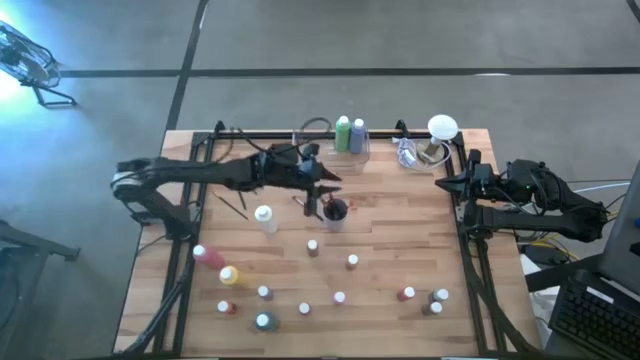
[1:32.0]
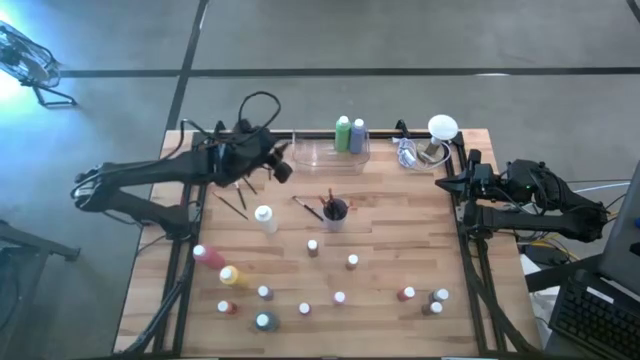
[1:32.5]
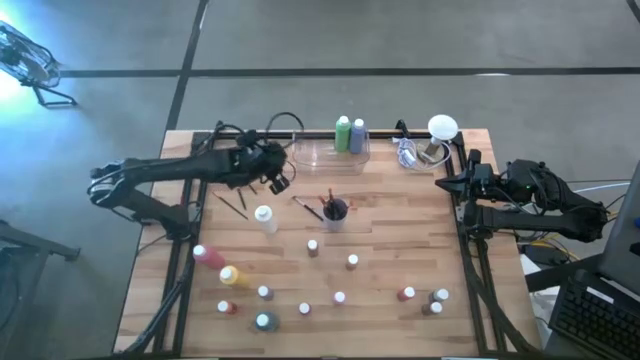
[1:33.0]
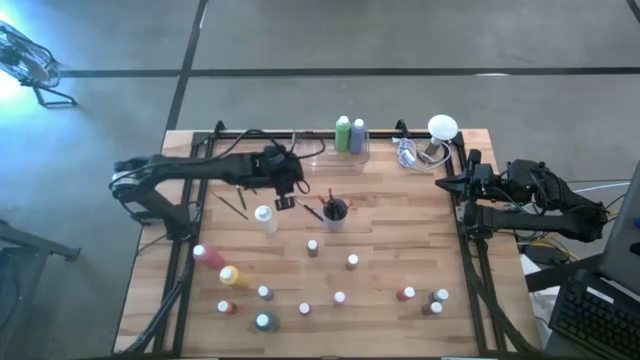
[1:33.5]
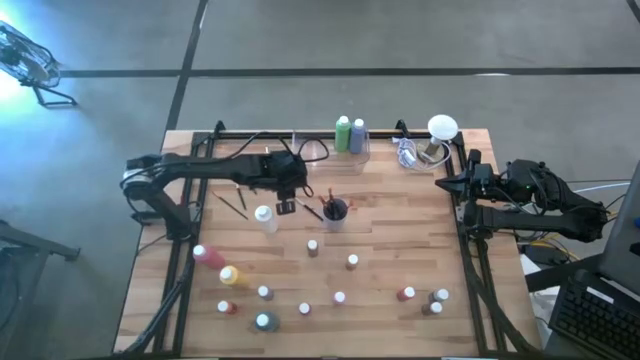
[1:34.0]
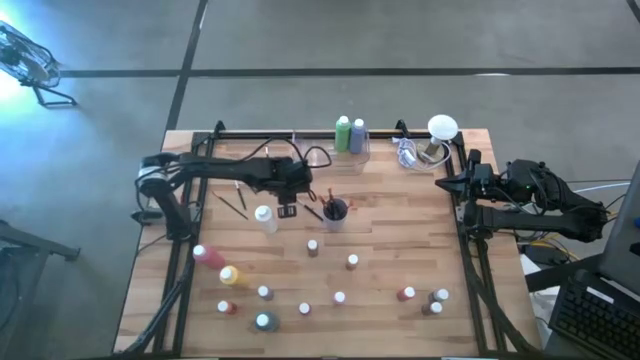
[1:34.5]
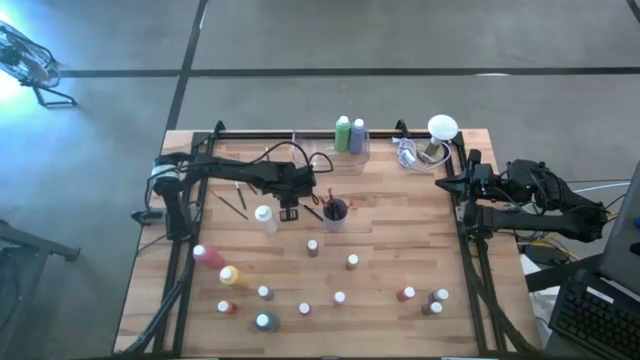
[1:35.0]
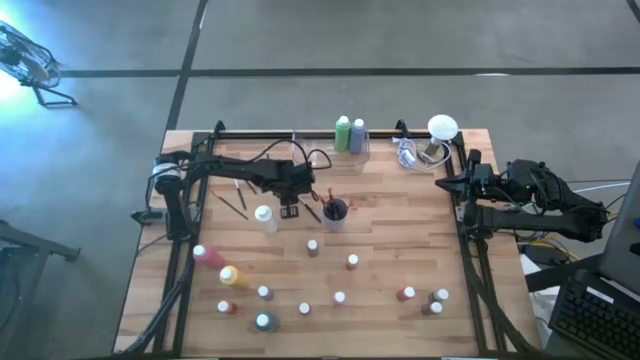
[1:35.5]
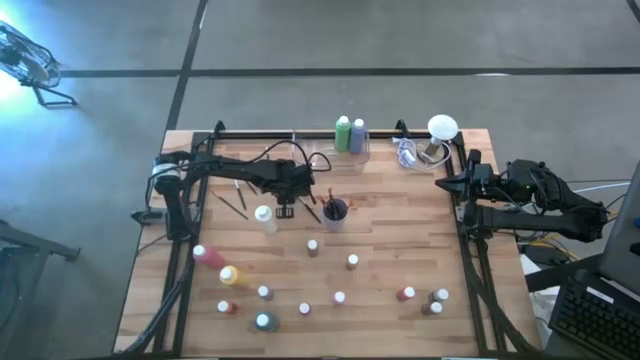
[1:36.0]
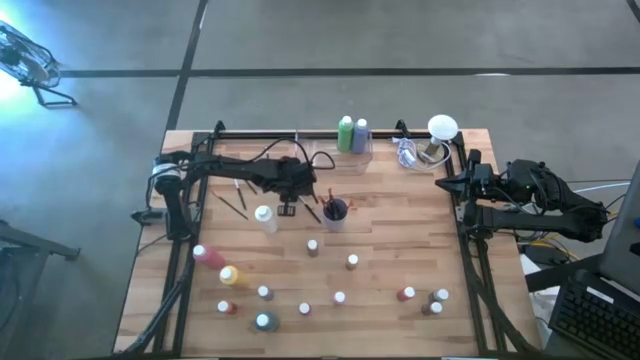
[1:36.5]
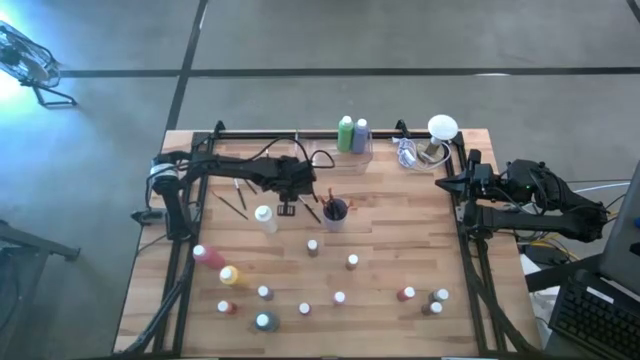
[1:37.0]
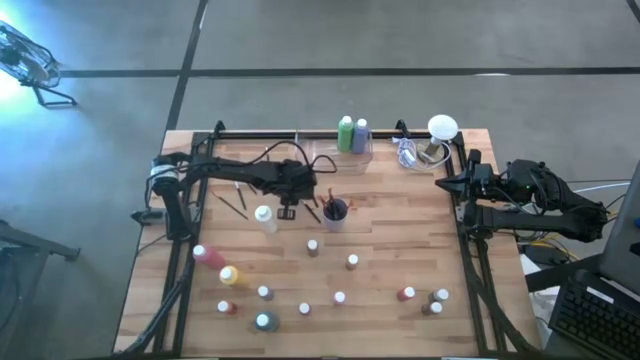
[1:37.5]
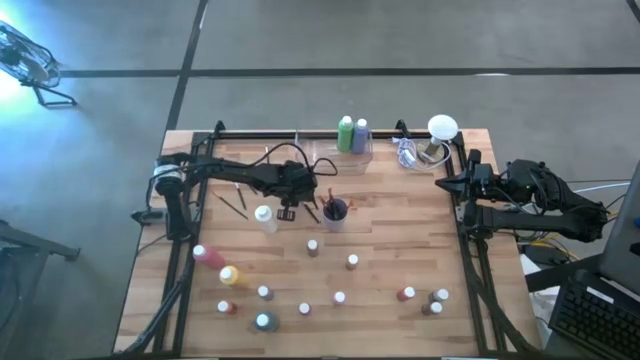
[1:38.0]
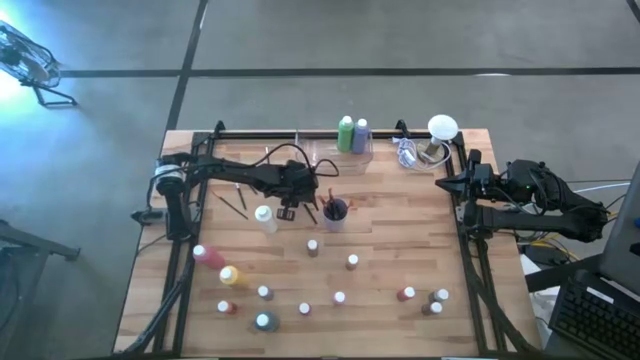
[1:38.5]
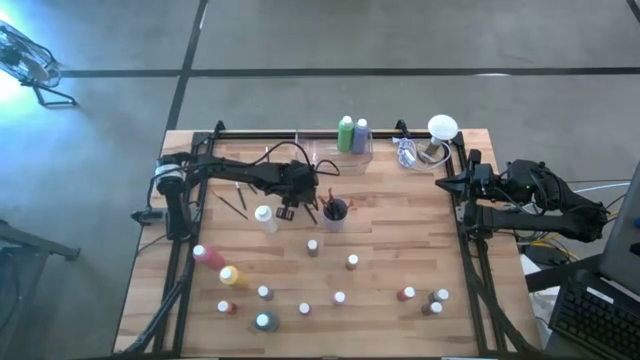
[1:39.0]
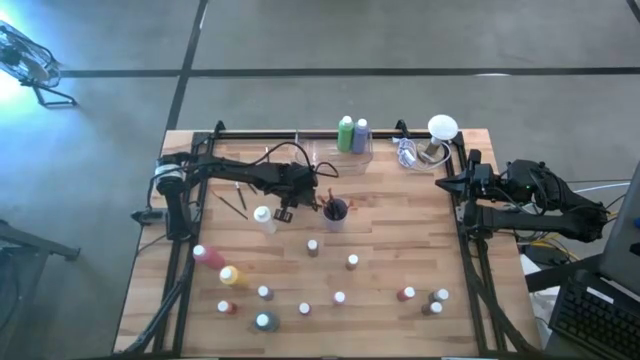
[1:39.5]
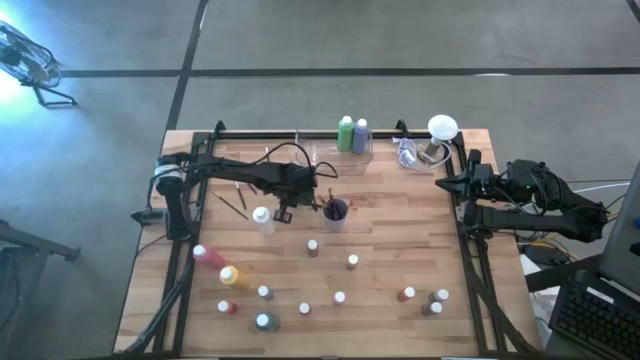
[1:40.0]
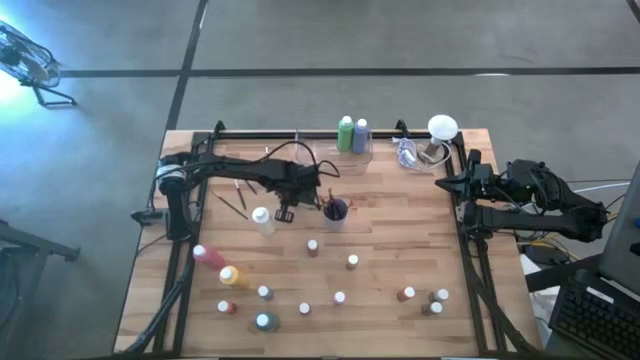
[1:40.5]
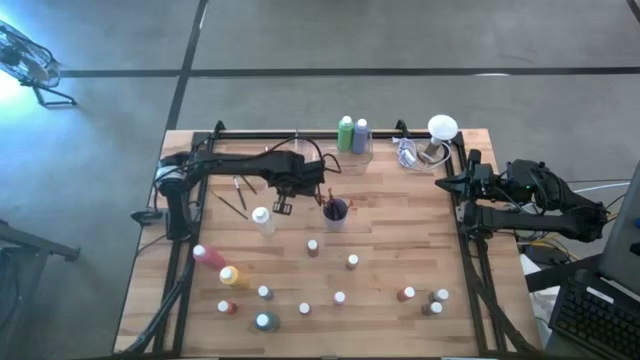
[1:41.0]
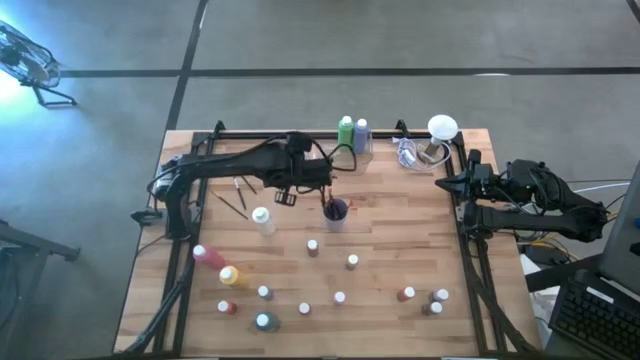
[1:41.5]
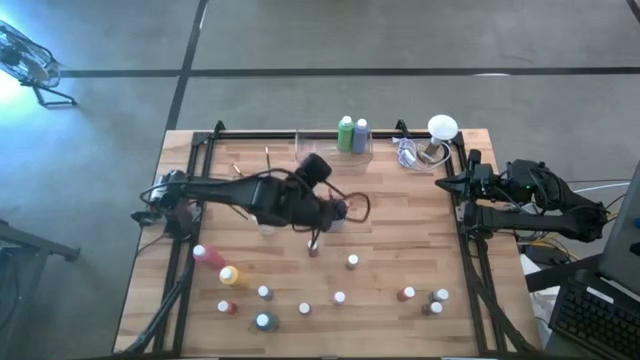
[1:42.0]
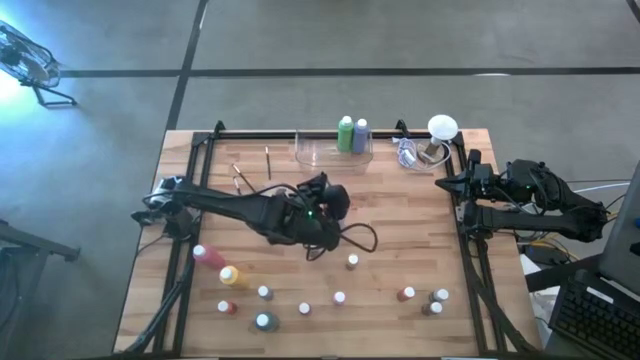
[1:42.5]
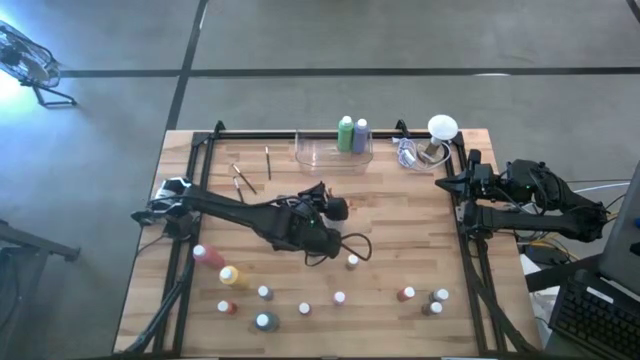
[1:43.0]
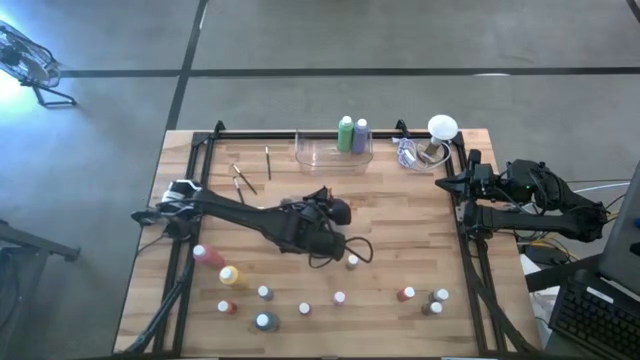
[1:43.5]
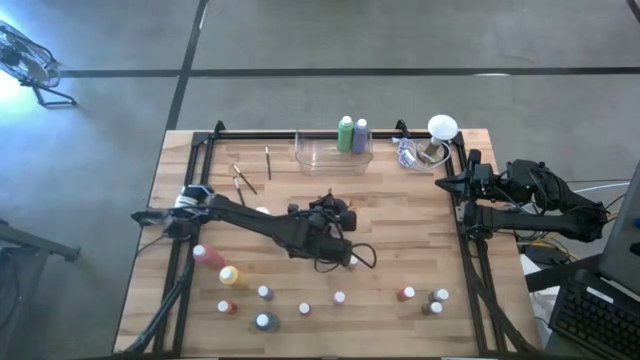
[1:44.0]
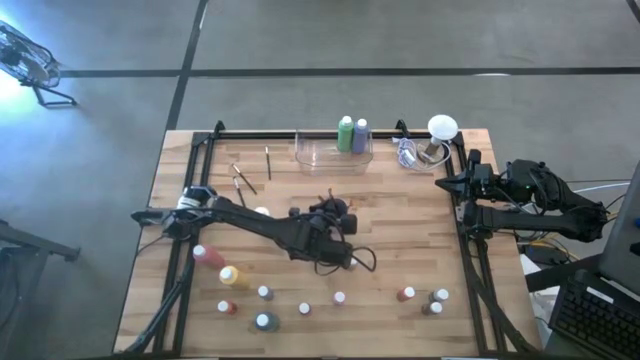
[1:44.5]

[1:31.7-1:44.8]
Task: Pick & Place Paint Supplies
Put the silver paint brush into the purple cup

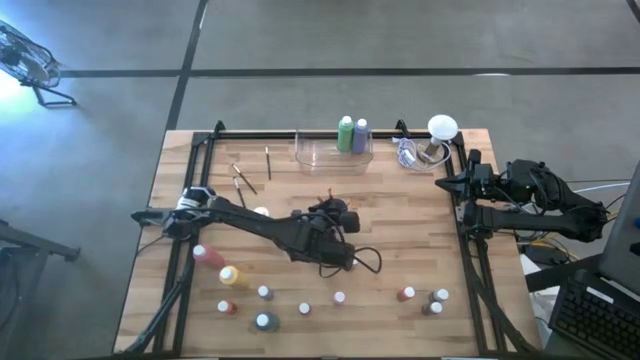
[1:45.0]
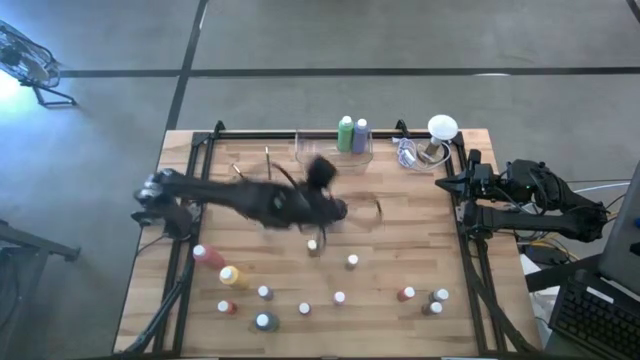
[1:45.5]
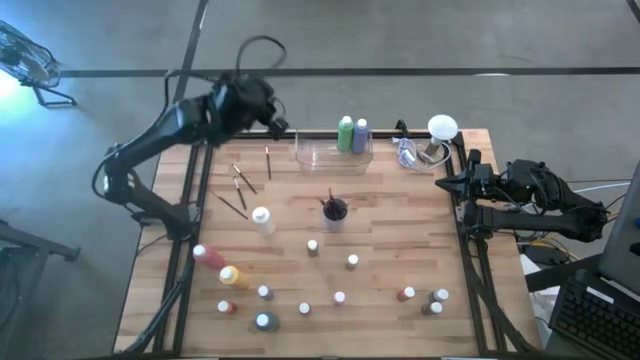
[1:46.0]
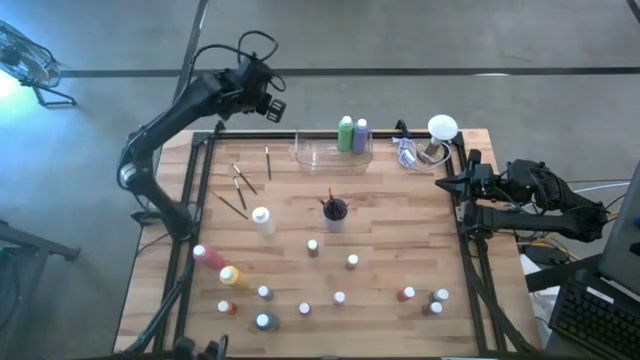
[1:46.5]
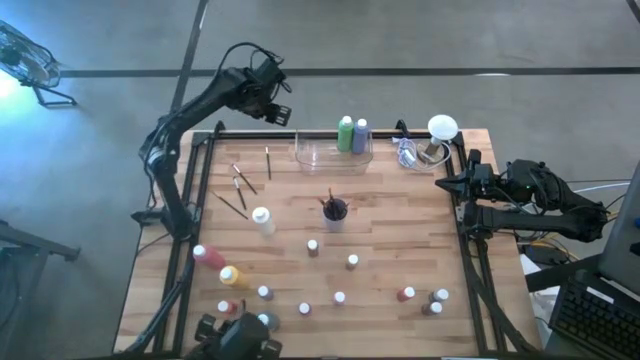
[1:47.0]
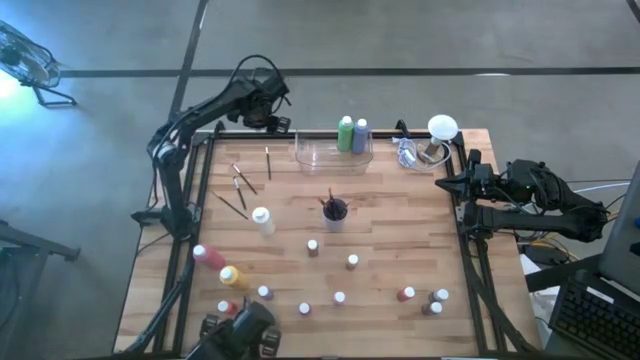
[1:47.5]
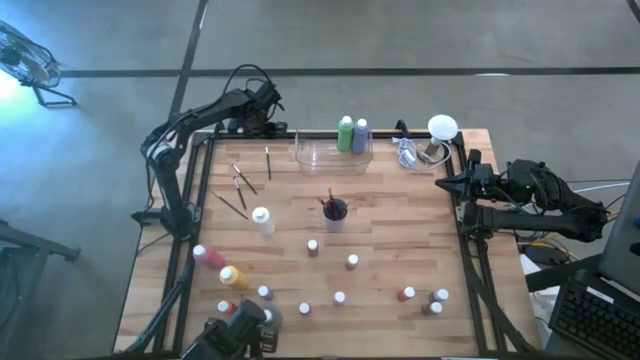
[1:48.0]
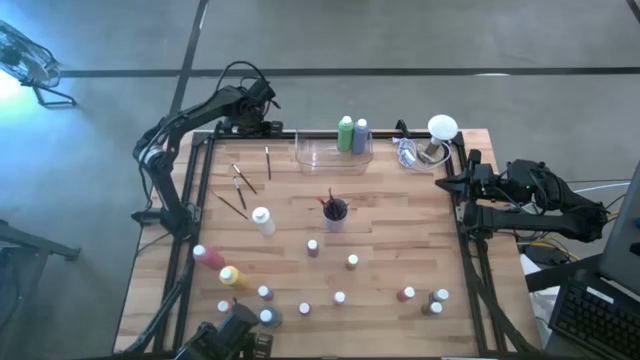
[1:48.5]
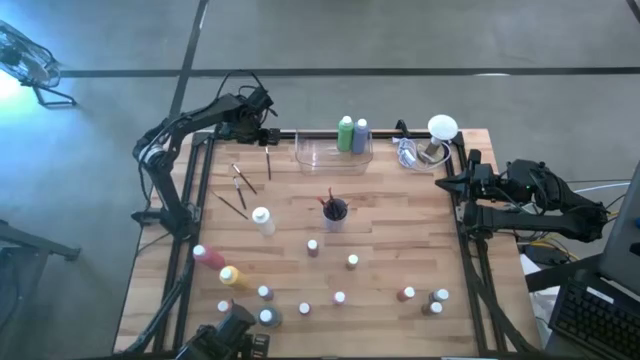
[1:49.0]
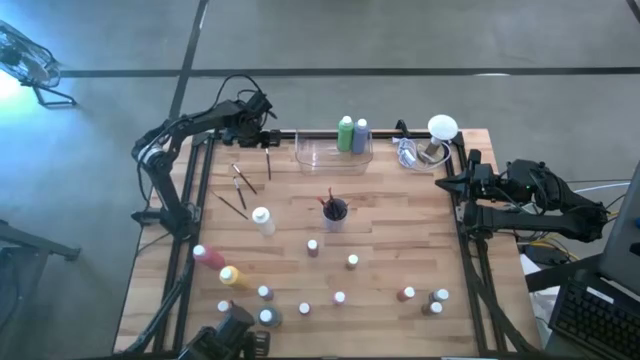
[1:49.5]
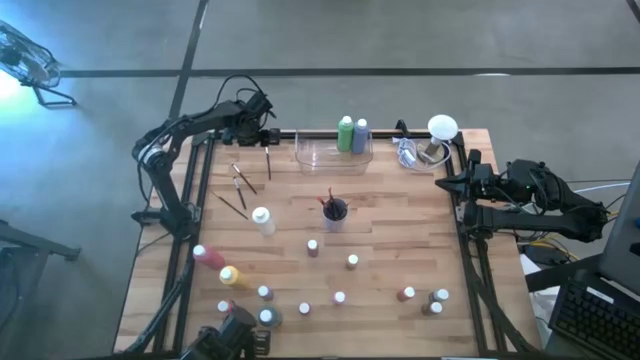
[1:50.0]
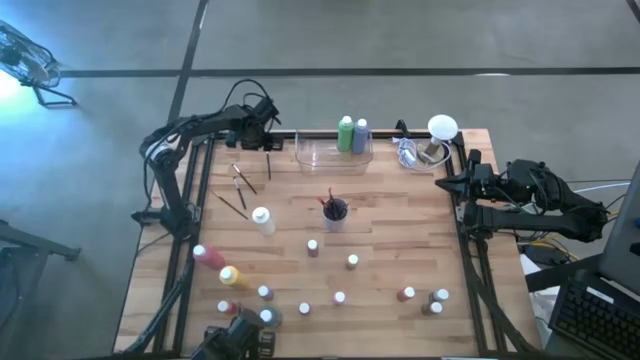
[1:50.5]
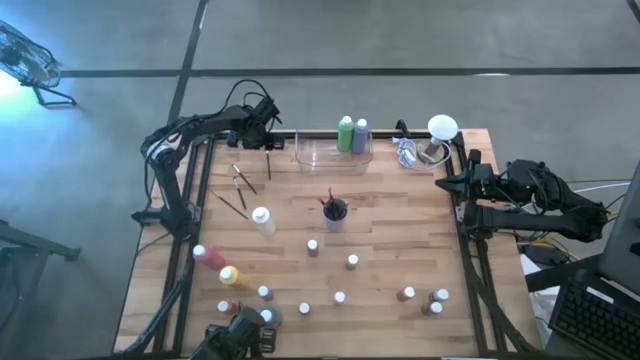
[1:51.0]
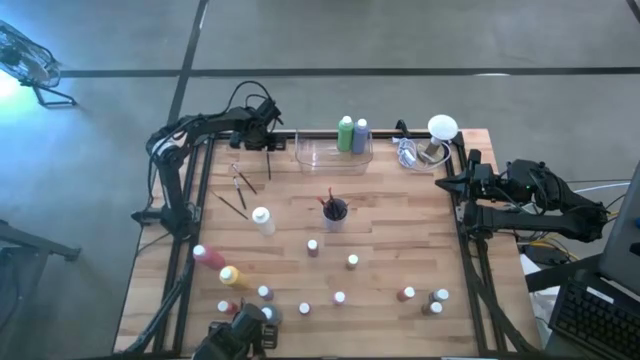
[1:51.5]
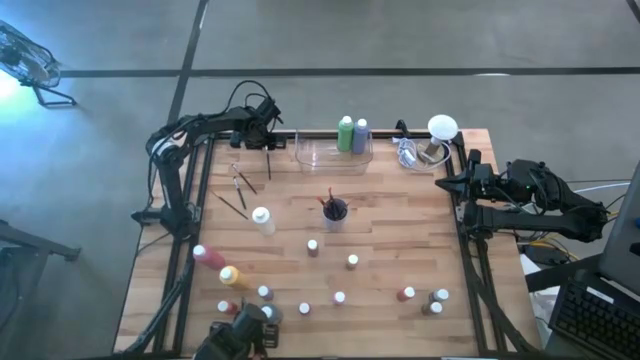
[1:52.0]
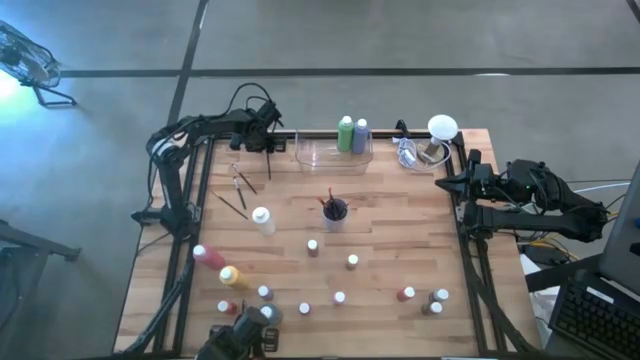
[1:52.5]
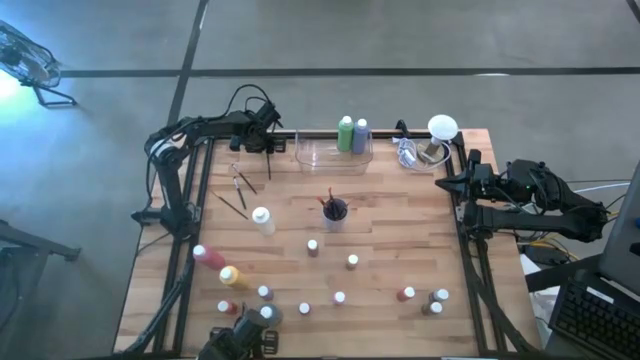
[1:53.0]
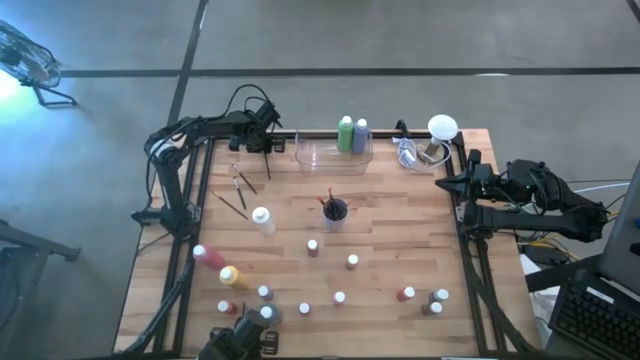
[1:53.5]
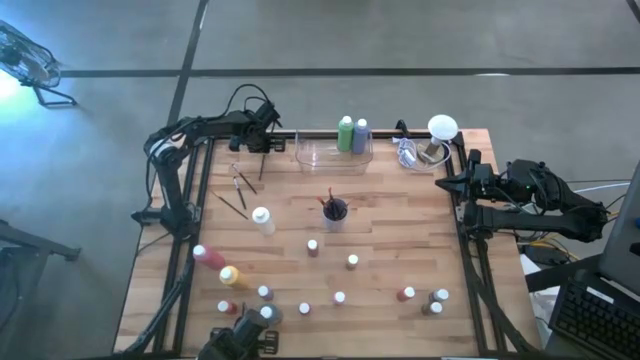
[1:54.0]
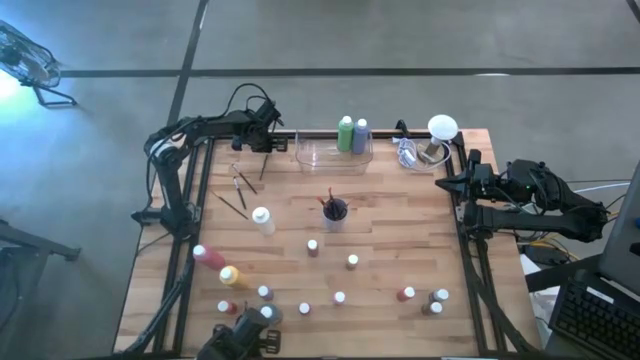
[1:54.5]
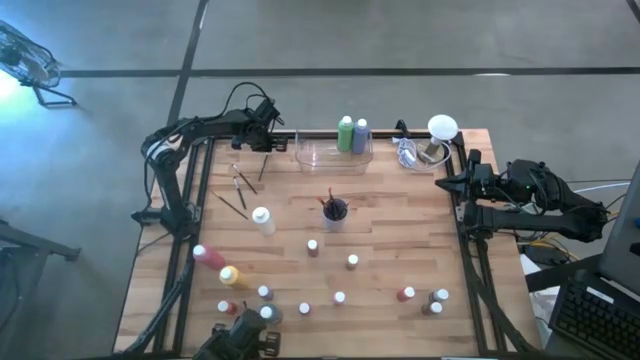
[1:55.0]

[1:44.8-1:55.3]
Put the silver paint brush into the purple cup
